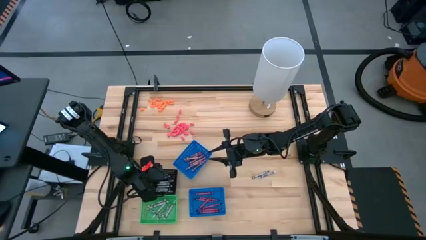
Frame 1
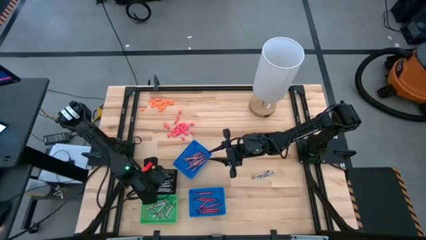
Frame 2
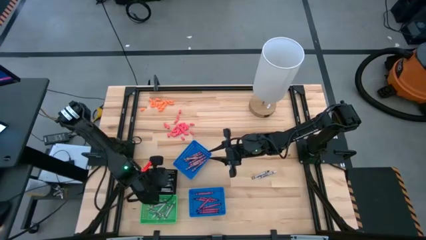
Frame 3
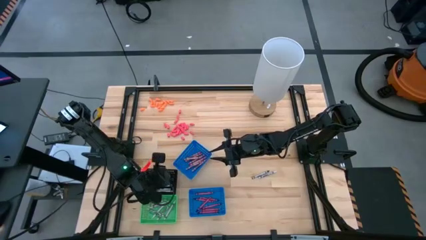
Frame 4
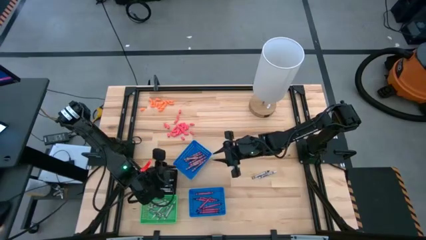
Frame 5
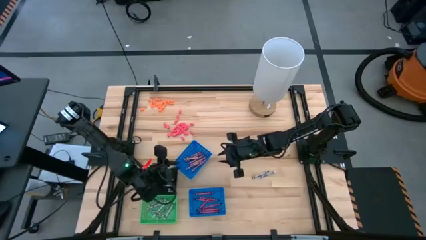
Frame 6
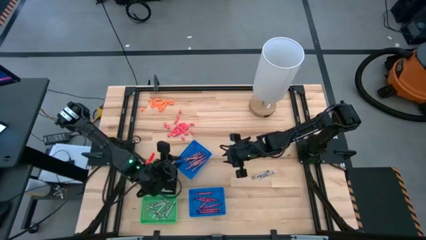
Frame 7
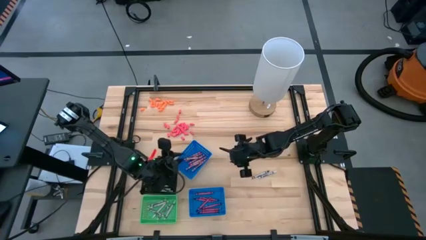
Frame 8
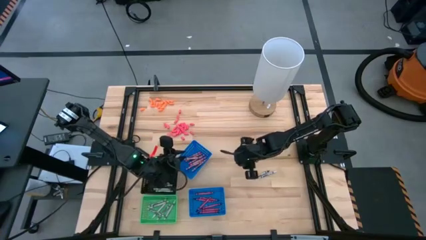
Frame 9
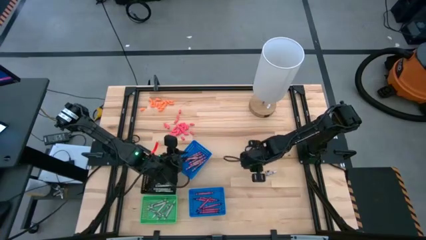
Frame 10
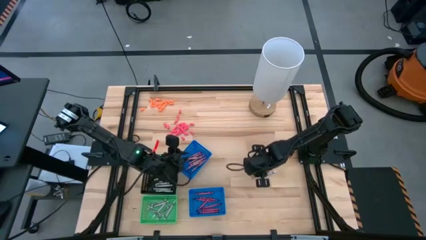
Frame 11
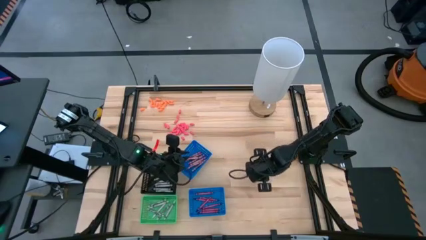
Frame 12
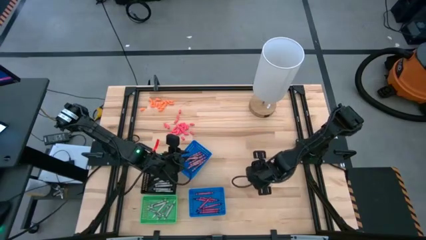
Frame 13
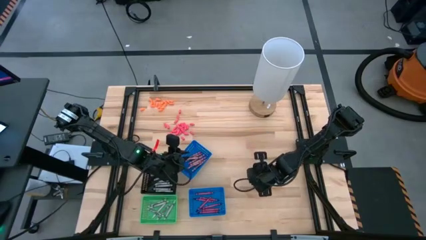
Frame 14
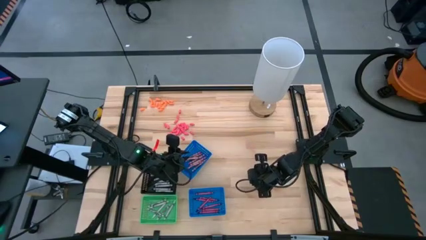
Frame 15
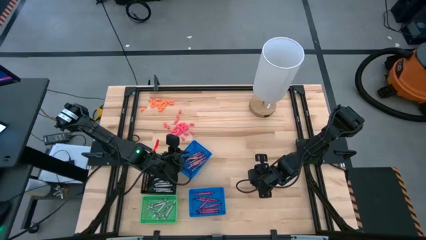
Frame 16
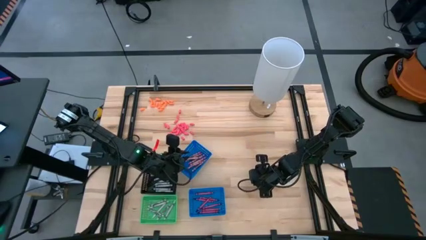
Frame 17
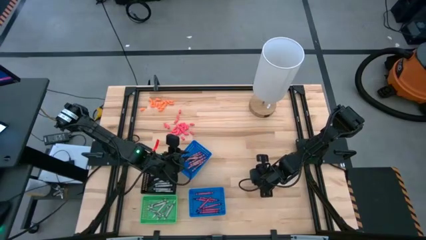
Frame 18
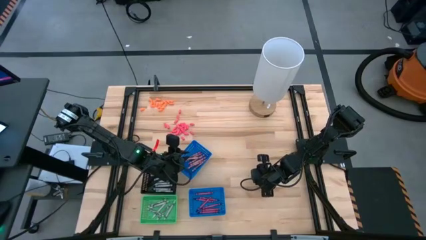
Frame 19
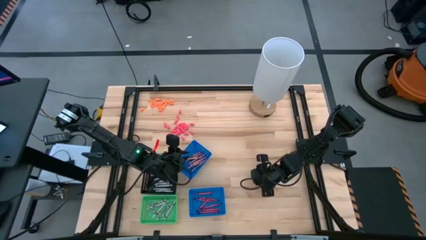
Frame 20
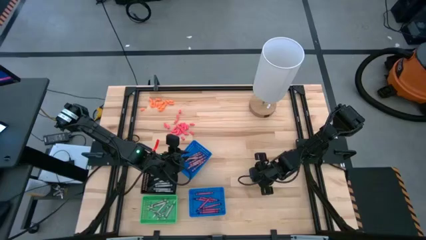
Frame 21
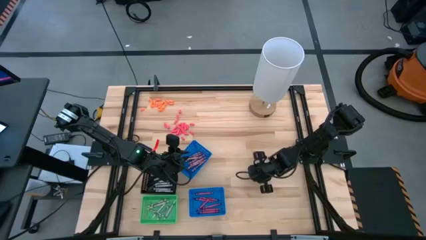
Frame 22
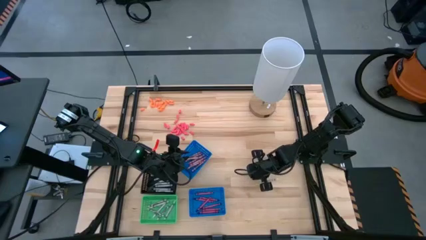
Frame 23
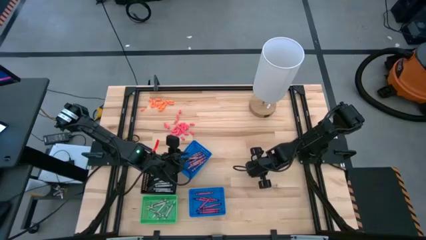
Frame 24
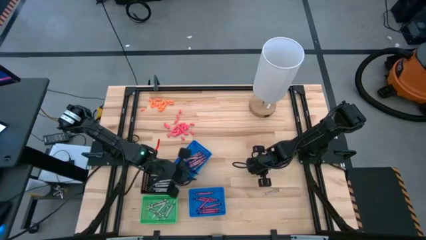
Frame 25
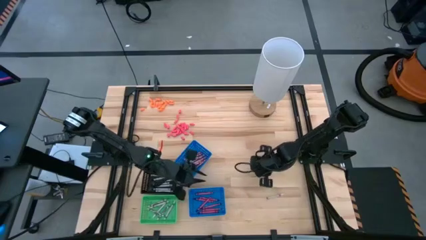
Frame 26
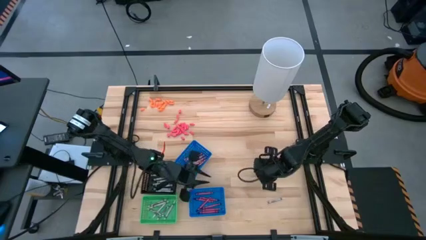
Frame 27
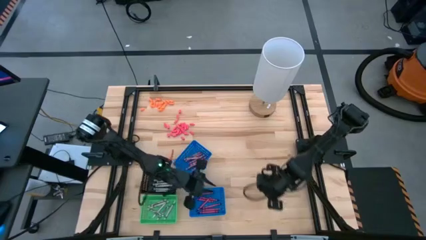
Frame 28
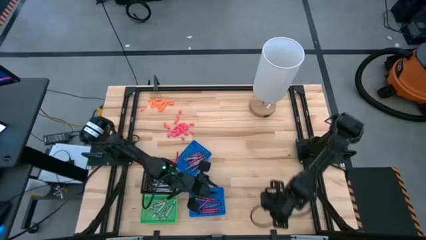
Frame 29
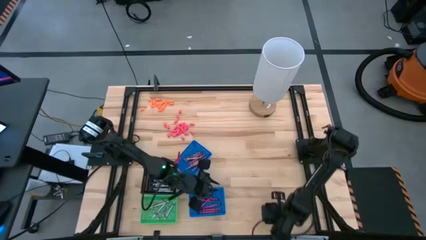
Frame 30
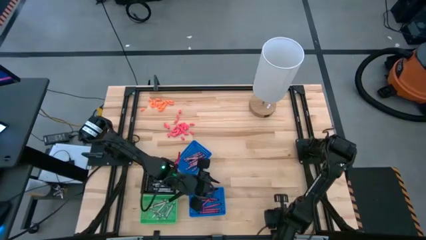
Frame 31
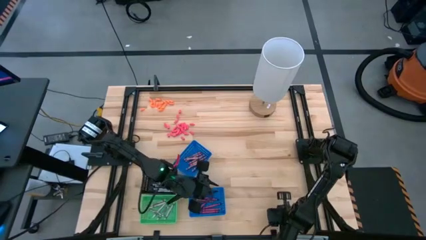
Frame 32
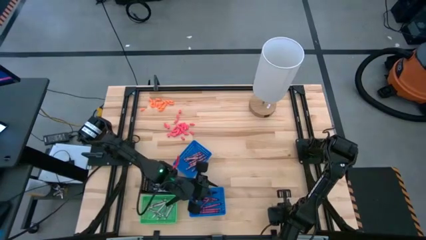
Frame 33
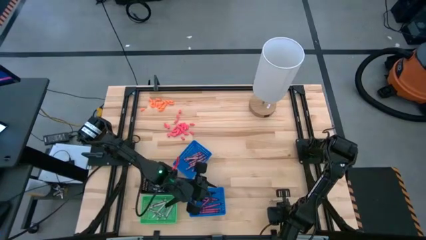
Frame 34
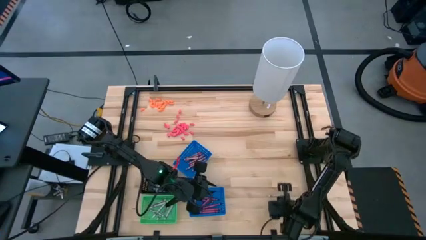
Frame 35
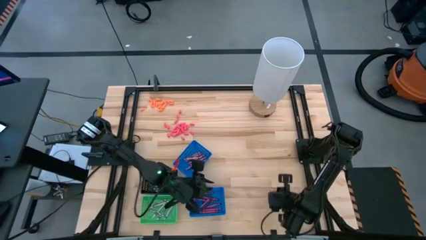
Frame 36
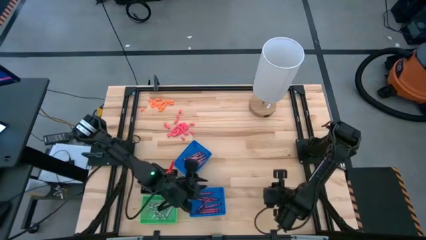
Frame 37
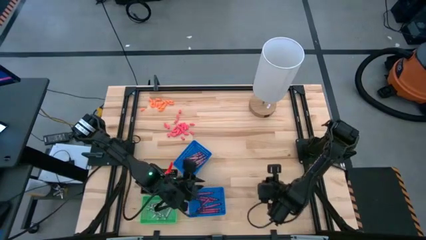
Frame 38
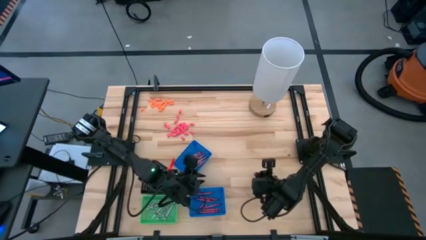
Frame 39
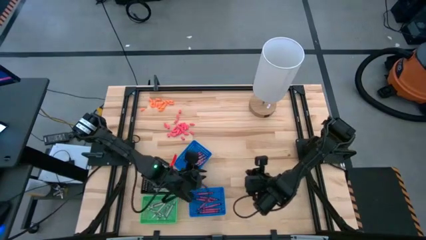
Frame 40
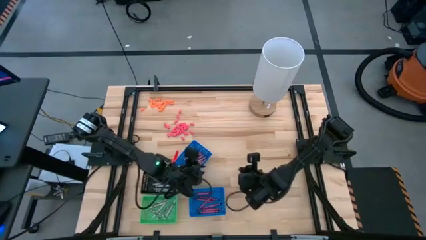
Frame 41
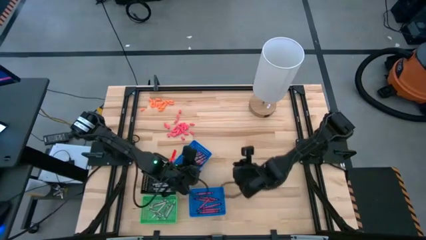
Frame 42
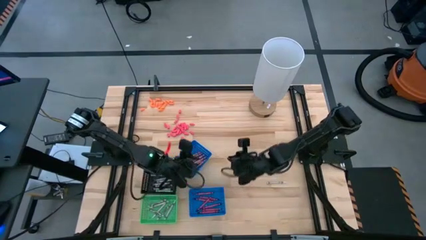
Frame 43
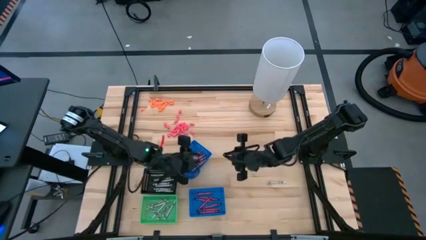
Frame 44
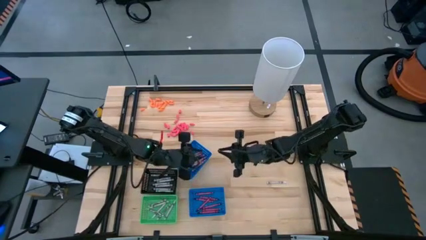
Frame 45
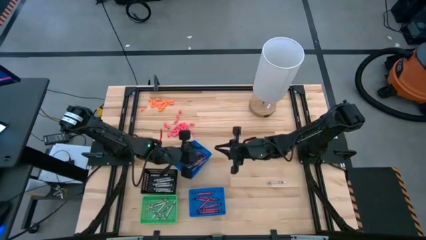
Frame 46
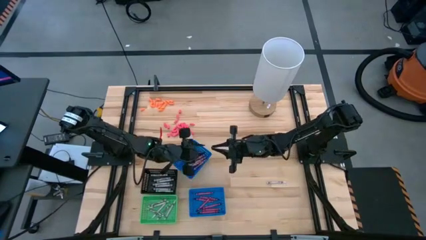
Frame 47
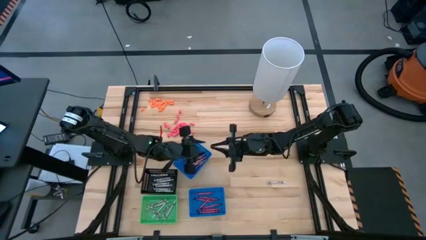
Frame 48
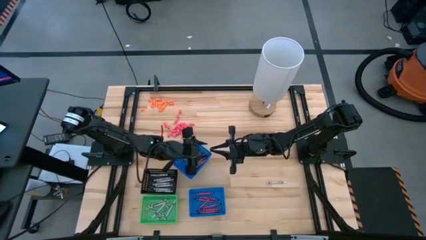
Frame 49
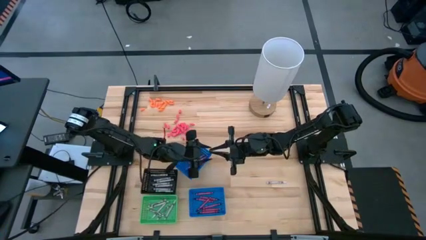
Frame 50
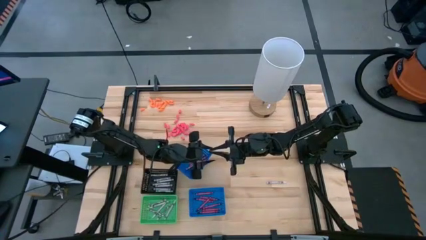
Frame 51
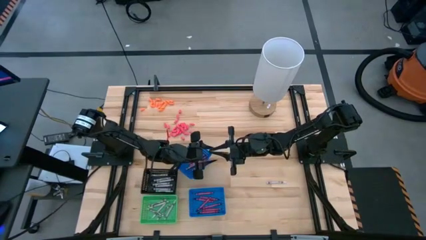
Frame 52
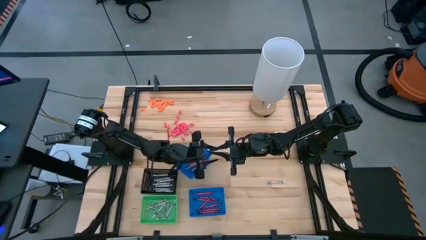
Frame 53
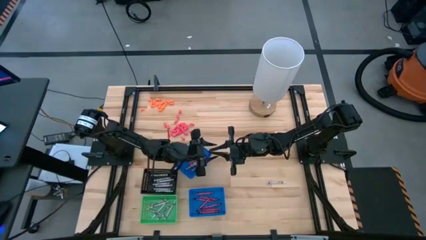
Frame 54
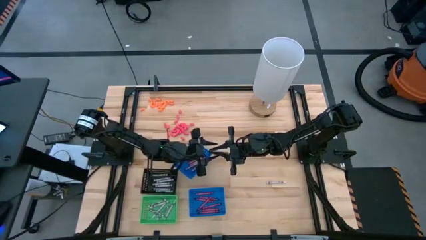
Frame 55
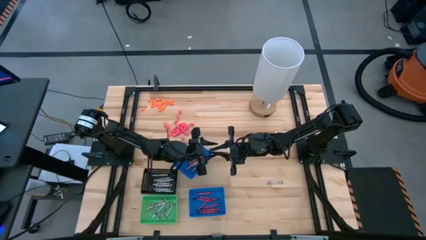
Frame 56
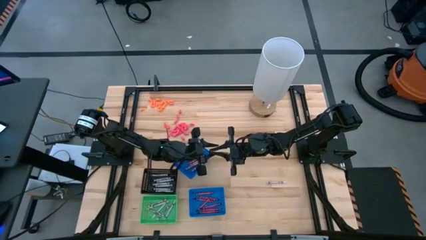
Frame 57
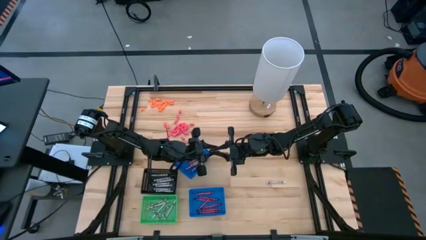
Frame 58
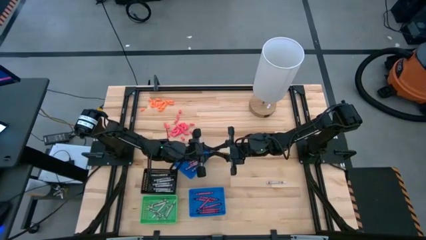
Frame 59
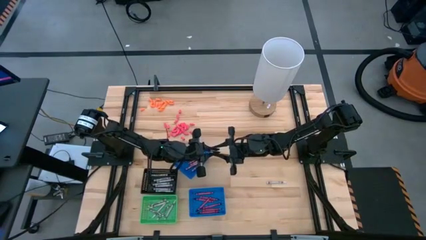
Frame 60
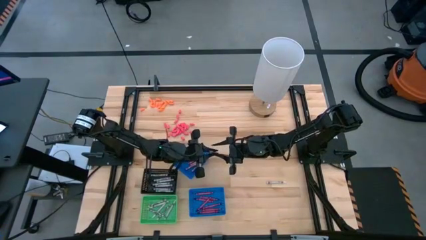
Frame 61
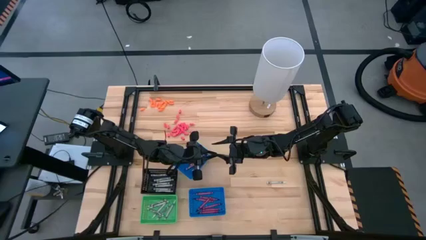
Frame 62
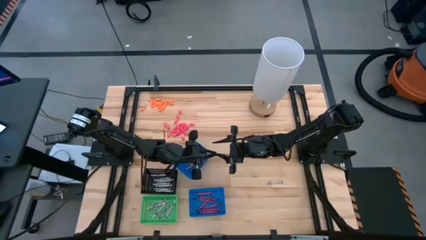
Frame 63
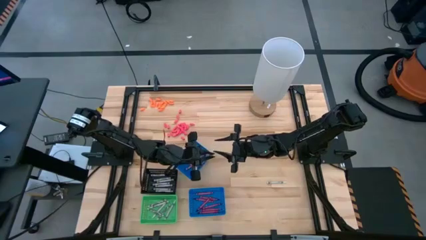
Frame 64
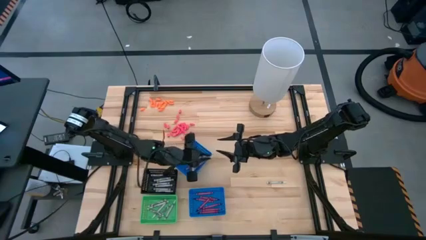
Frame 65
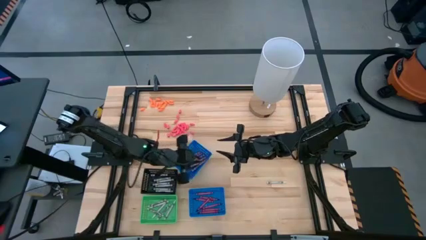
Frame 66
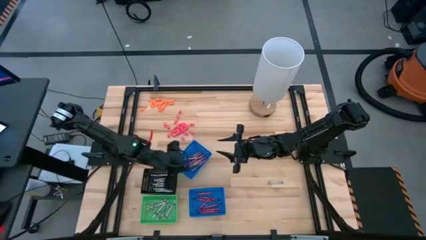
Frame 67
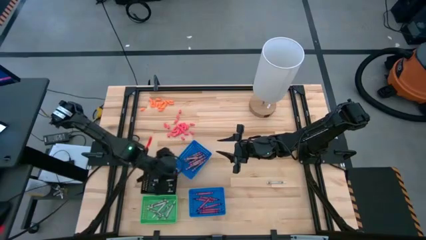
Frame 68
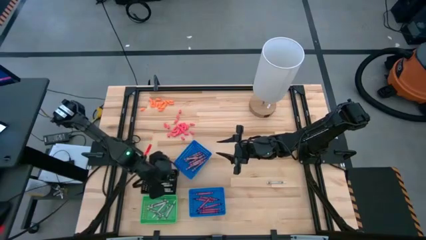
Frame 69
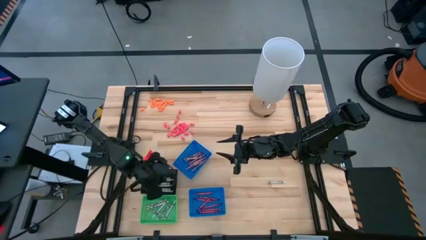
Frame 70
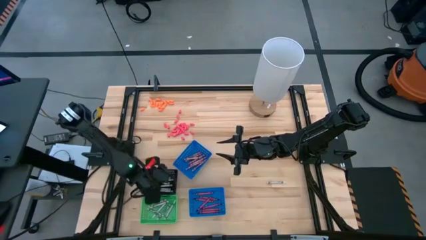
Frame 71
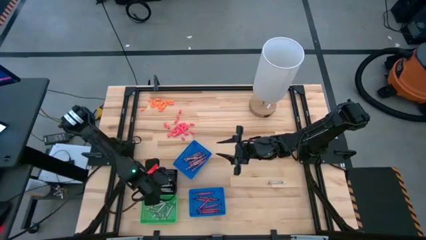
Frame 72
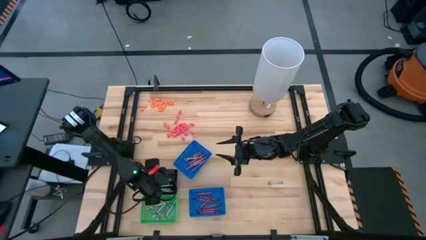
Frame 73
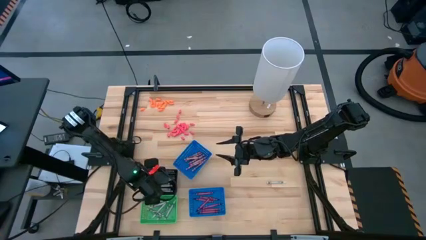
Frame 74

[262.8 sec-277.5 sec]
Task: Sort crayons
Put the black crayon into the black bin
